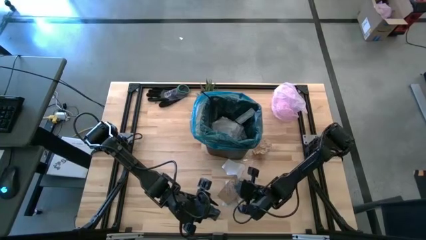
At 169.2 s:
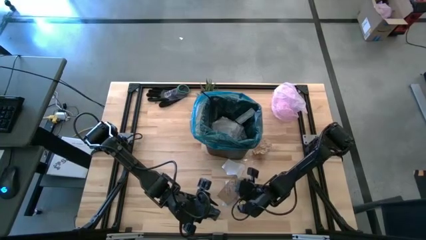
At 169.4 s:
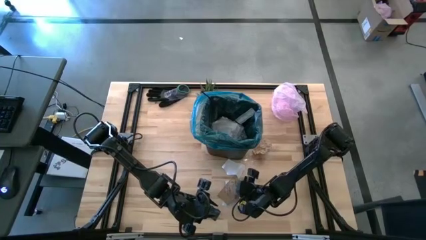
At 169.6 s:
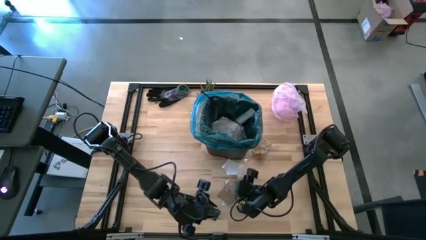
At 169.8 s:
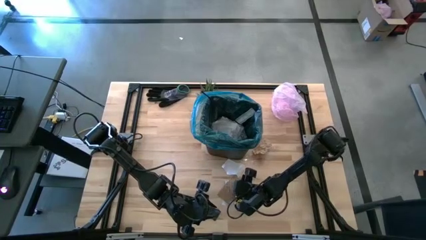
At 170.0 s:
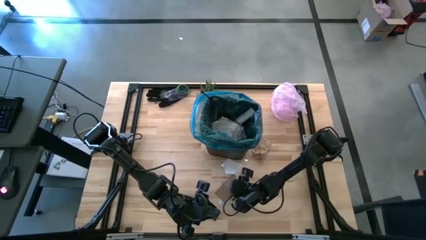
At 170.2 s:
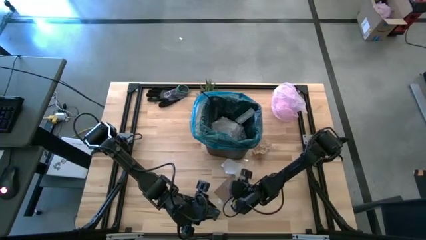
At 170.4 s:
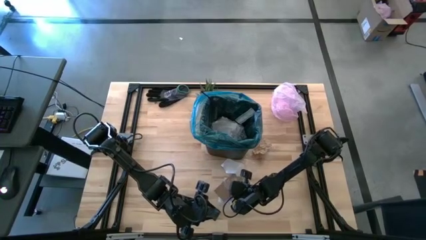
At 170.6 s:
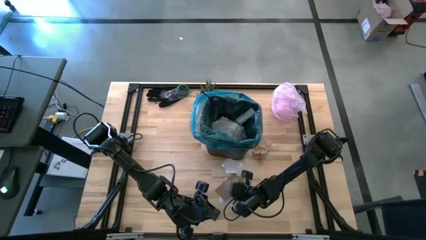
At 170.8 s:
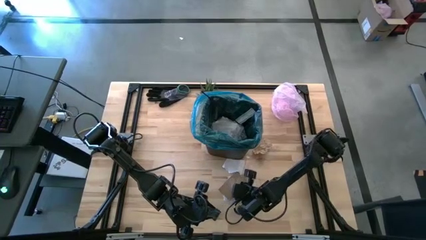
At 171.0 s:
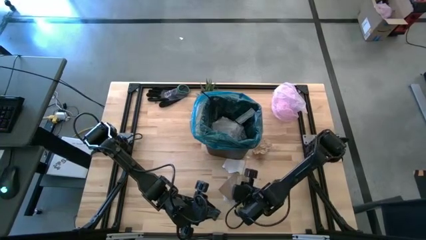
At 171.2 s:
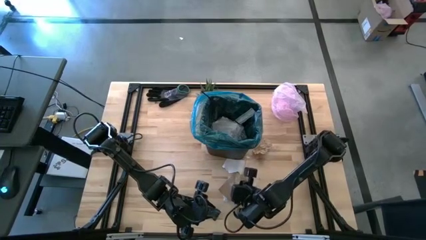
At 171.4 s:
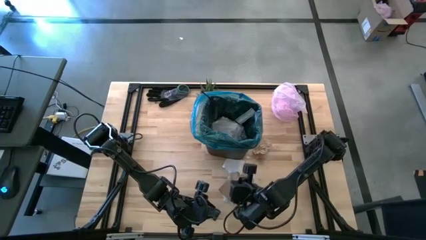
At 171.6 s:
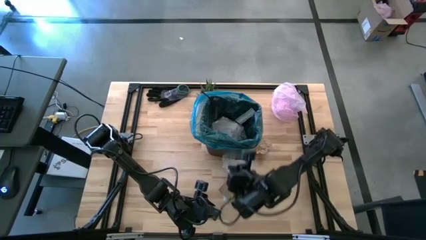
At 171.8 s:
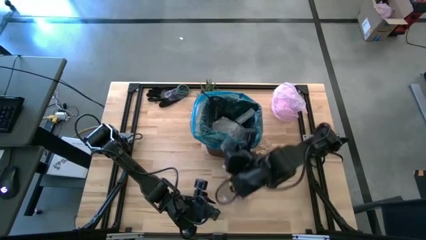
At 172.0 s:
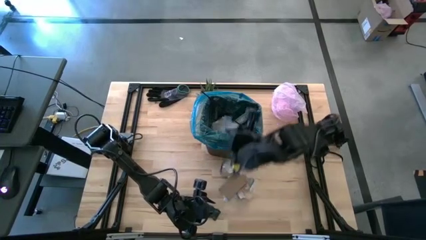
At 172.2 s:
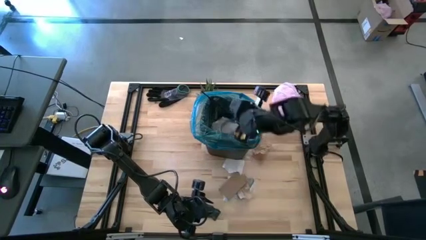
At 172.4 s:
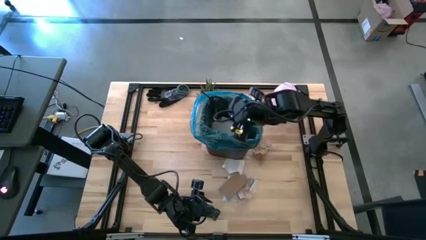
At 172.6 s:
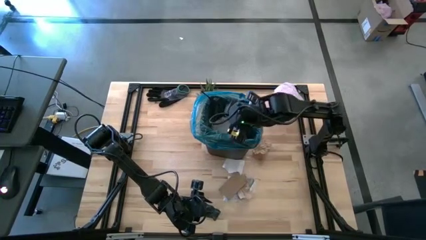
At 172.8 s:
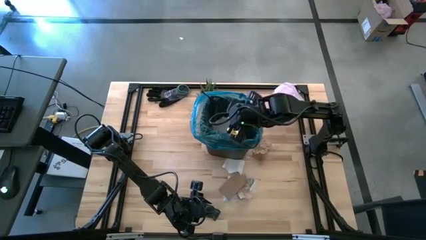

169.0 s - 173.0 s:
Task: place trash/remove bag and relplace
Put the transparent plastic into the trash bin

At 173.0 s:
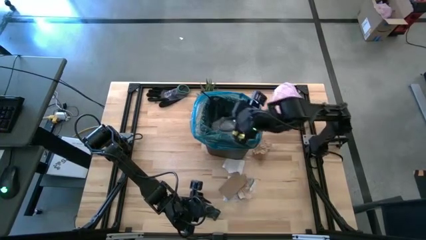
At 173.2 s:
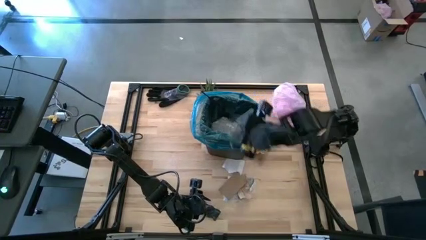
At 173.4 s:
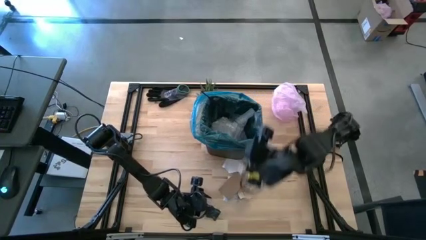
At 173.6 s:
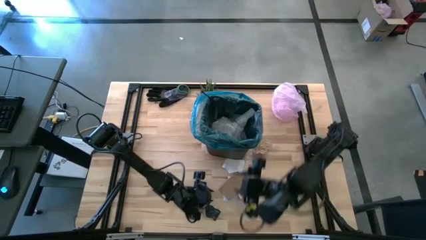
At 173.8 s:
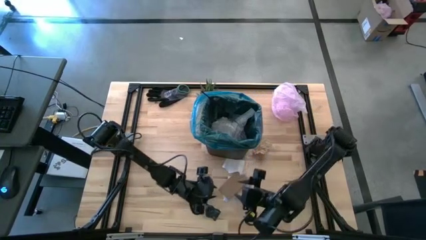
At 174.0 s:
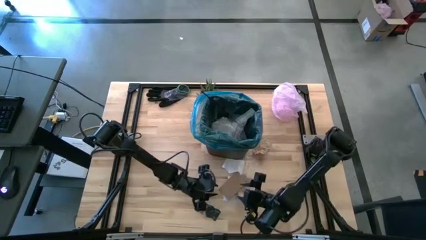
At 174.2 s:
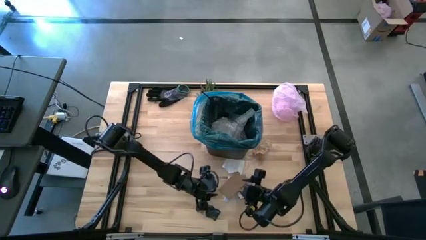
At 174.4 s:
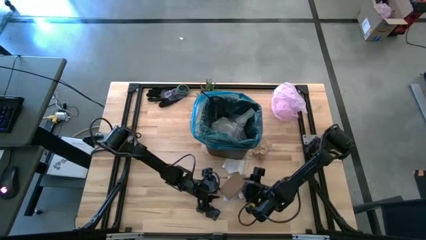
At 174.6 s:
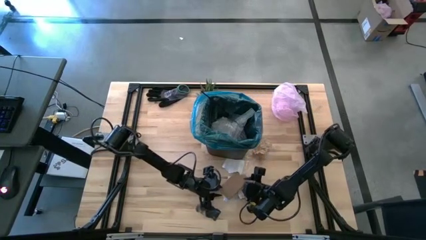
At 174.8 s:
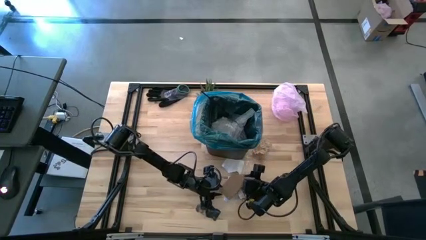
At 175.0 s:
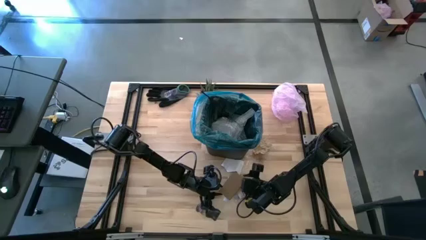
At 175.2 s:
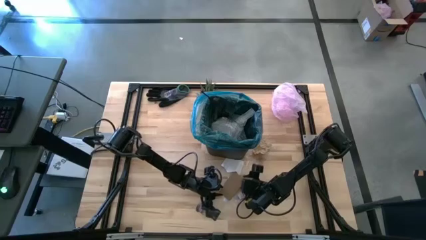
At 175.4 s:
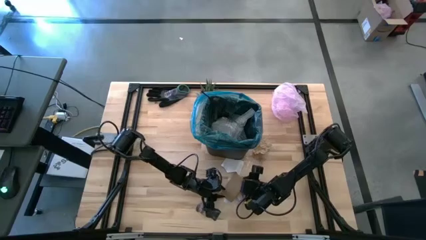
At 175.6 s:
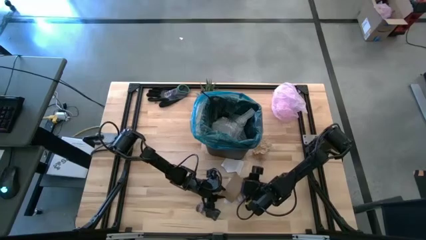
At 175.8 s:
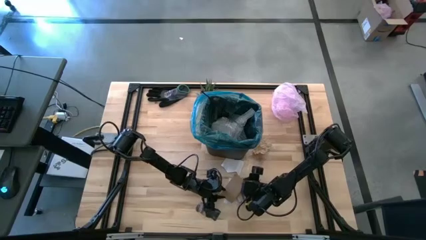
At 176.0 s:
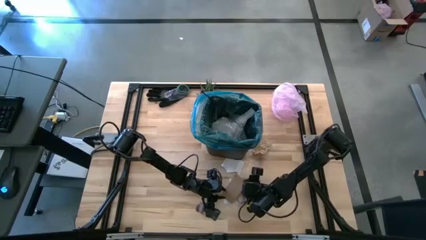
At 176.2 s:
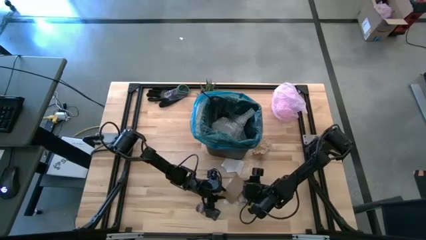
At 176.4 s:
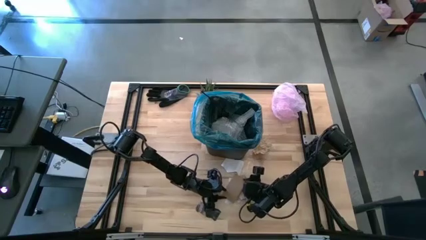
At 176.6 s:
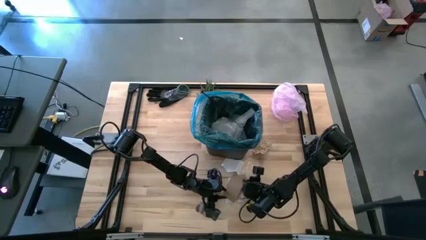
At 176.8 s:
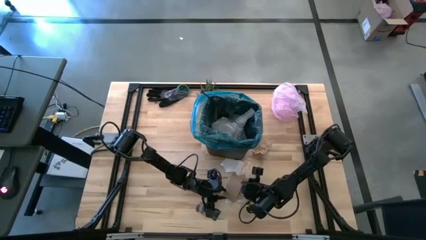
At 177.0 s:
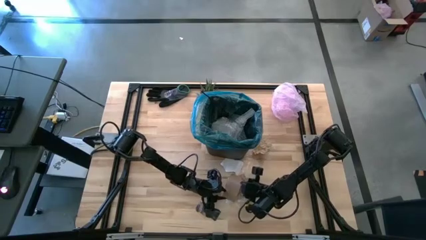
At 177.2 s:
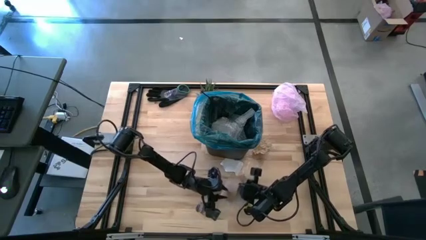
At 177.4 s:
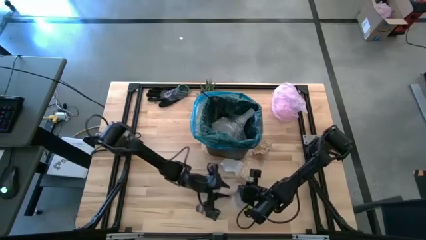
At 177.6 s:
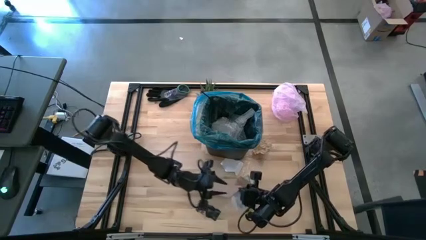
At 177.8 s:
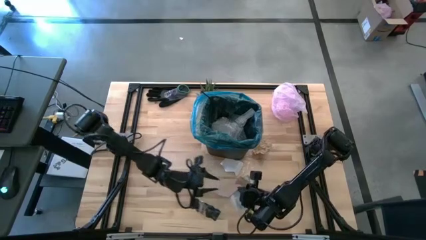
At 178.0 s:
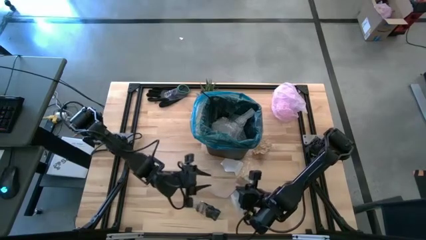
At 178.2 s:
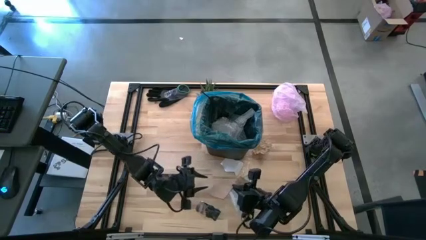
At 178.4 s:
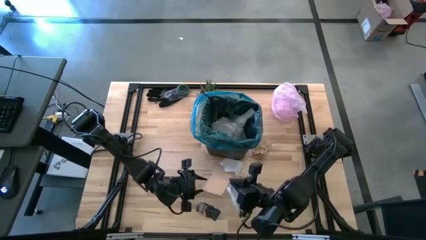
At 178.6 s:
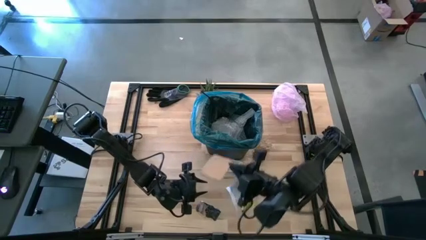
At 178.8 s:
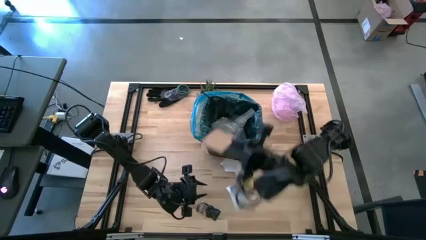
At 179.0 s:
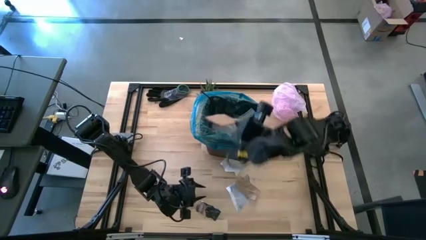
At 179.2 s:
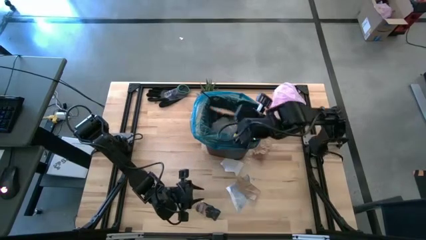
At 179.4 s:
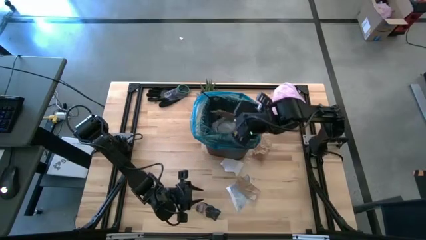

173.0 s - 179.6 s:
Put the brown cardboard paper into the trash bin

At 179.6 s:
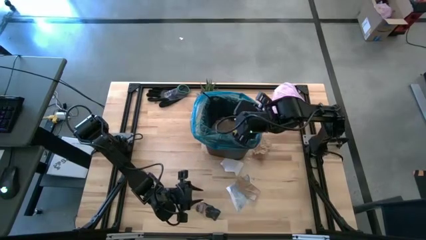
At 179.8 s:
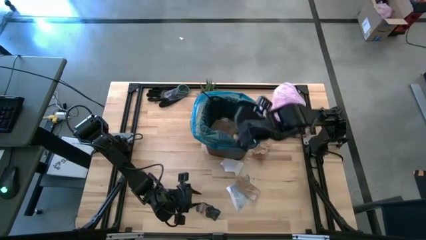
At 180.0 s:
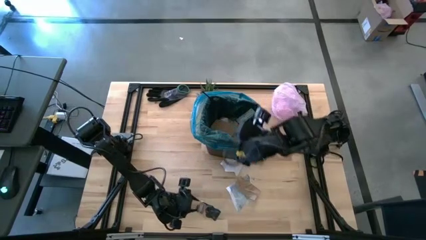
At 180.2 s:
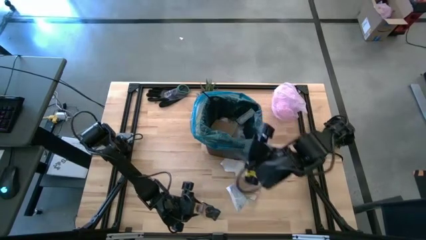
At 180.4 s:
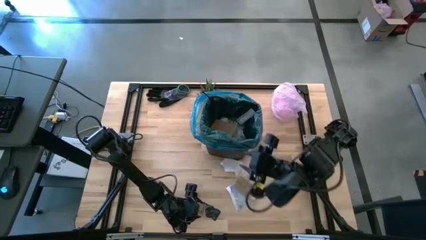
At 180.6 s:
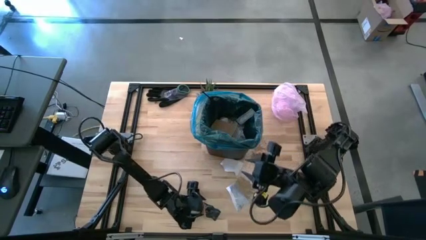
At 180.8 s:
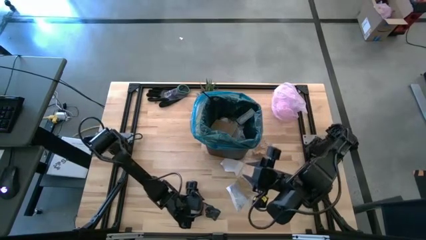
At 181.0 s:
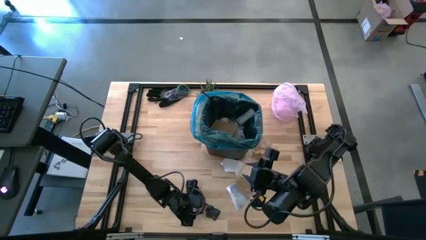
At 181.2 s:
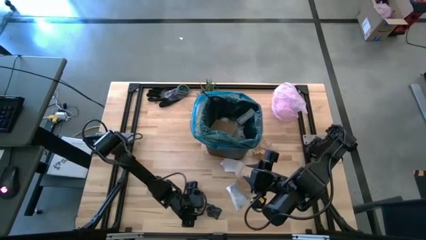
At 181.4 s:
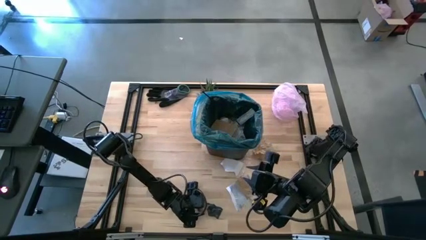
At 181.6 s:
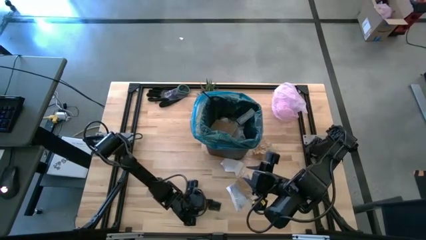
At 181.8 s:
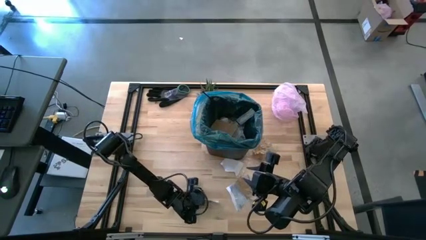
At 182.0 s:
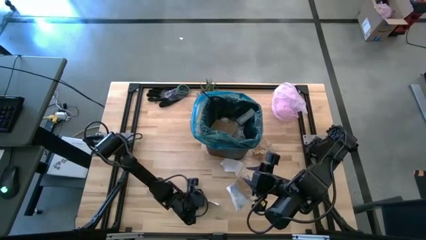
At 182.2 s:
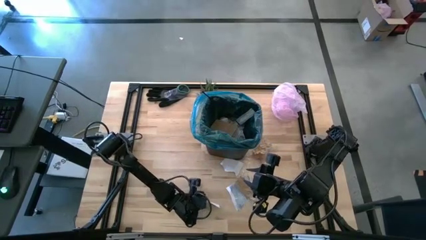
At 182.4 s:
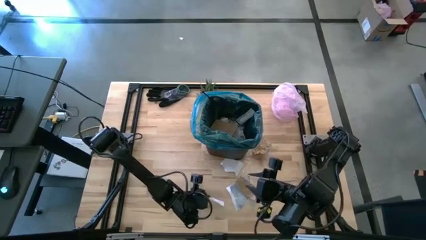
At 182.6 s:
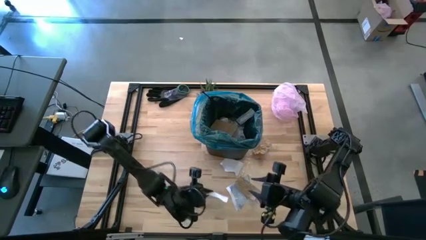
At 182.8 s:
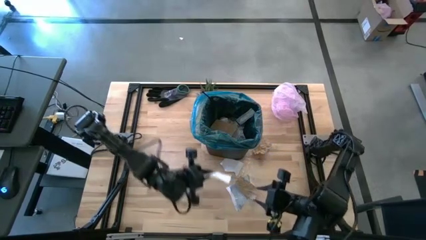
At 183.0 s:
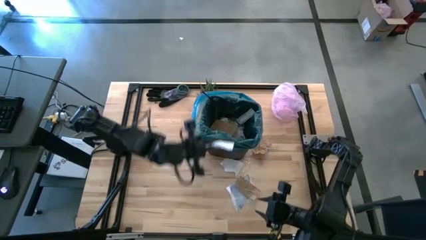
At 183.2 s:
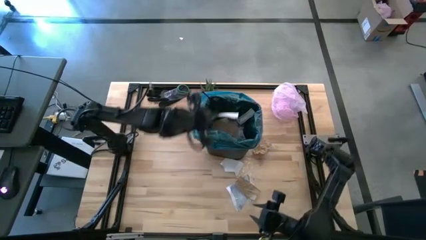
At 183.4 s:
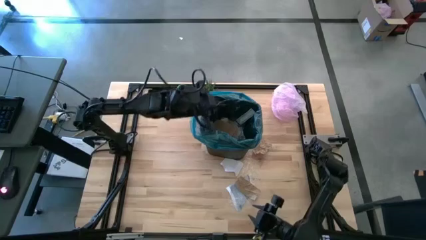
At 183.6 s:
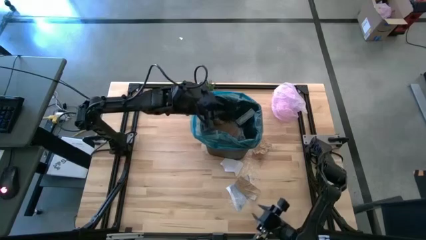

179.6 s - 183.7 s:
Put the black paper into the trash bin
